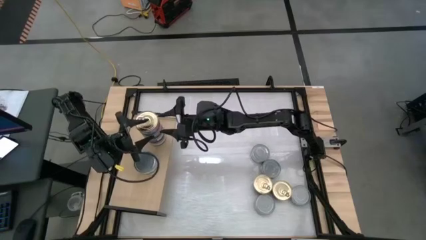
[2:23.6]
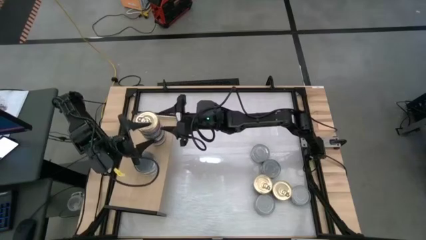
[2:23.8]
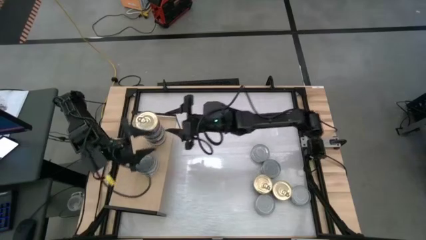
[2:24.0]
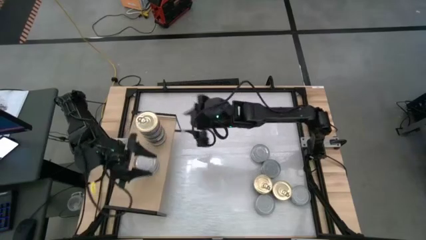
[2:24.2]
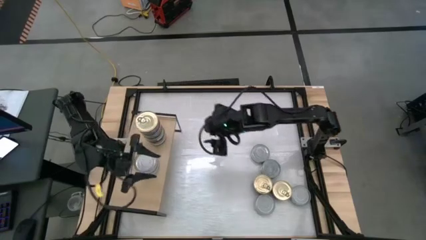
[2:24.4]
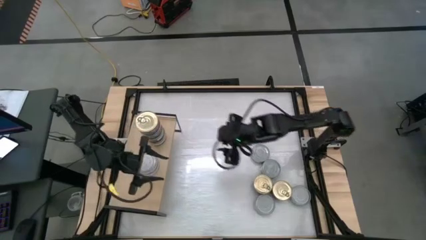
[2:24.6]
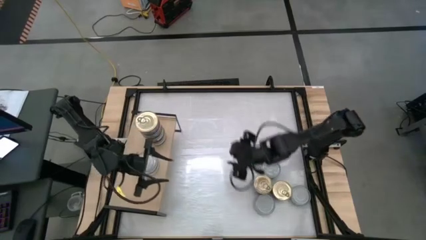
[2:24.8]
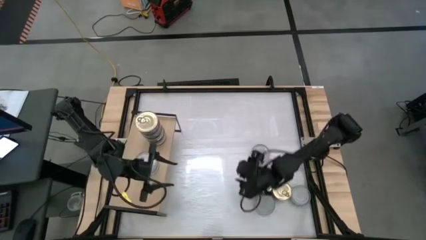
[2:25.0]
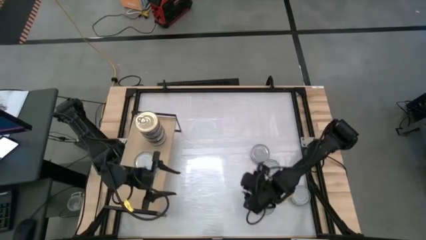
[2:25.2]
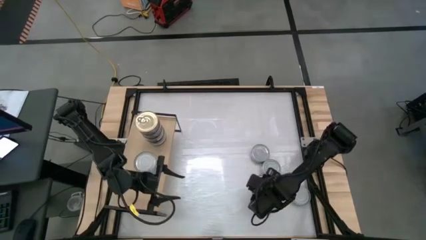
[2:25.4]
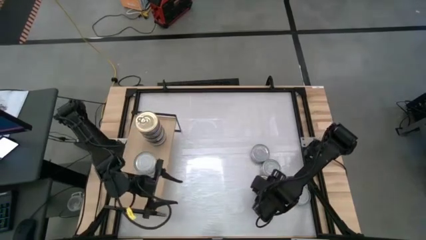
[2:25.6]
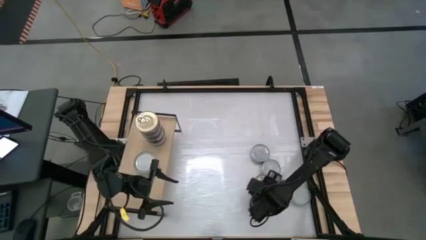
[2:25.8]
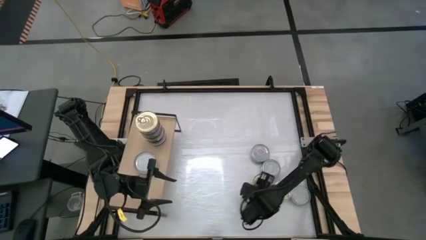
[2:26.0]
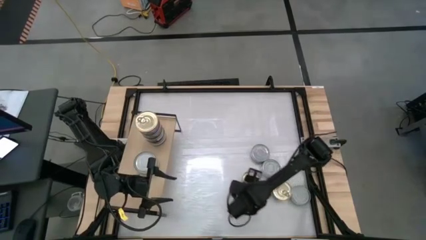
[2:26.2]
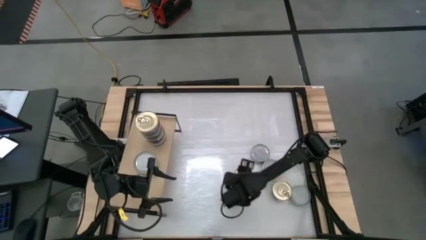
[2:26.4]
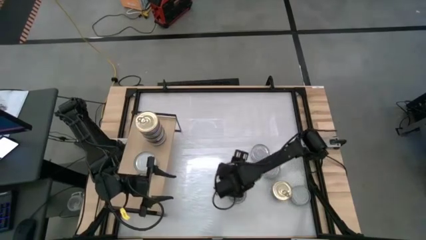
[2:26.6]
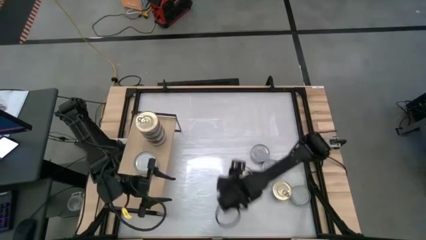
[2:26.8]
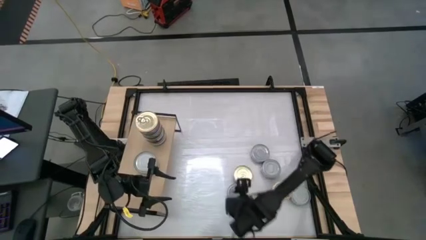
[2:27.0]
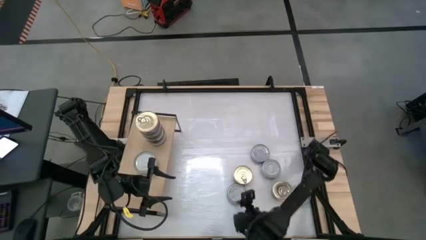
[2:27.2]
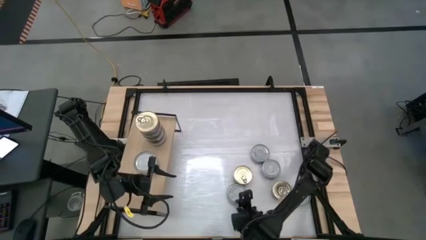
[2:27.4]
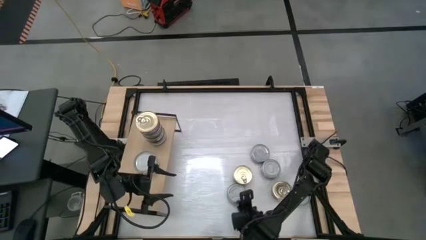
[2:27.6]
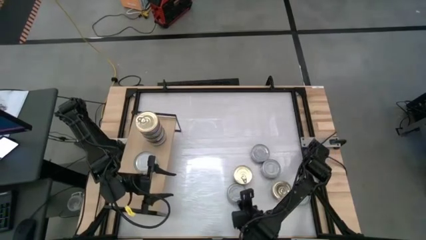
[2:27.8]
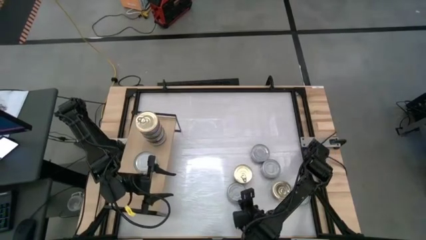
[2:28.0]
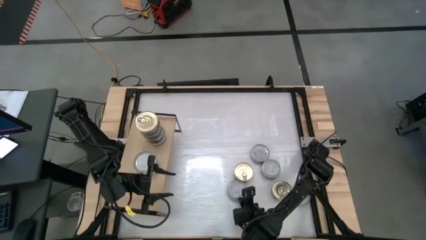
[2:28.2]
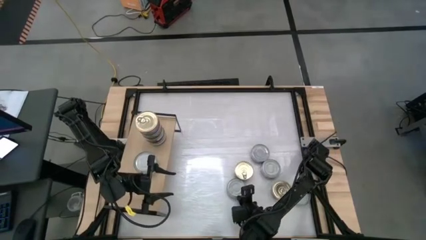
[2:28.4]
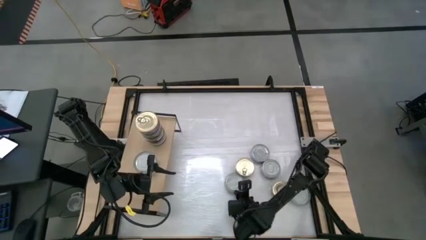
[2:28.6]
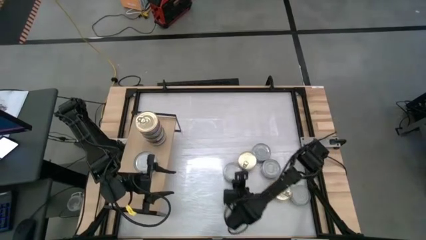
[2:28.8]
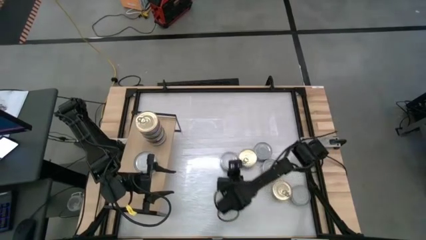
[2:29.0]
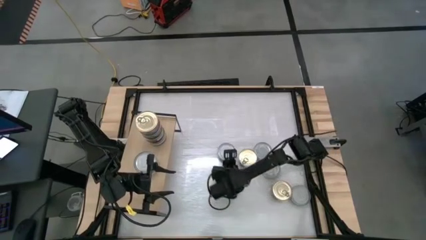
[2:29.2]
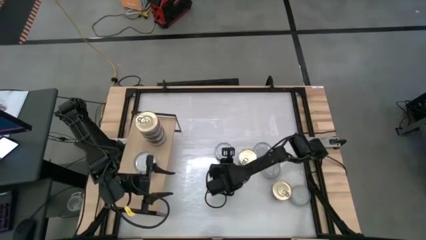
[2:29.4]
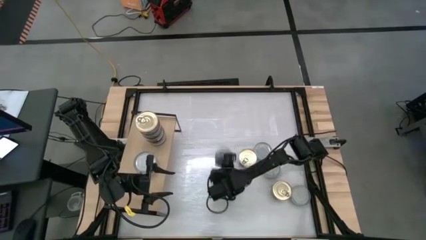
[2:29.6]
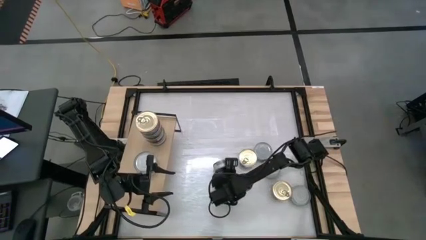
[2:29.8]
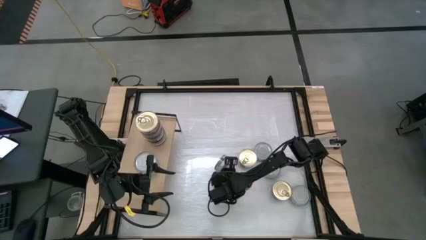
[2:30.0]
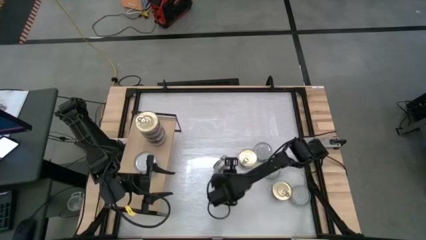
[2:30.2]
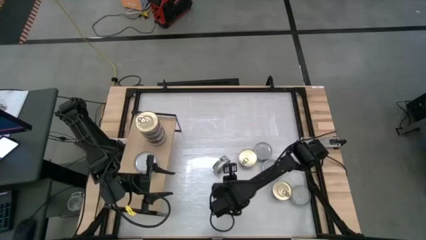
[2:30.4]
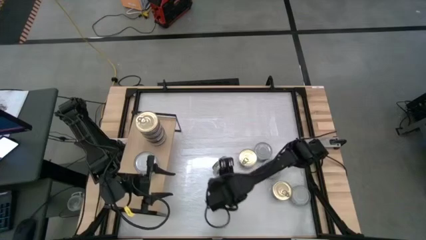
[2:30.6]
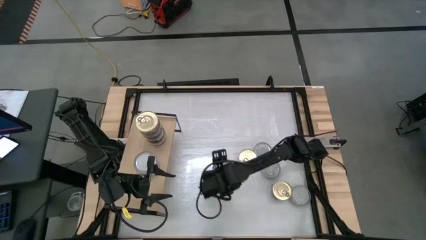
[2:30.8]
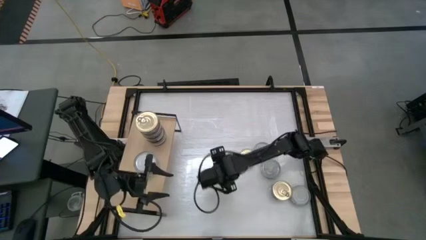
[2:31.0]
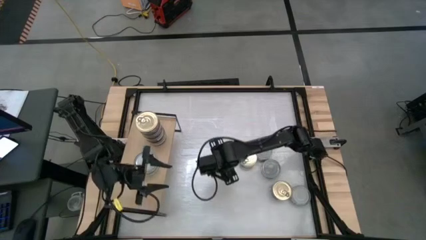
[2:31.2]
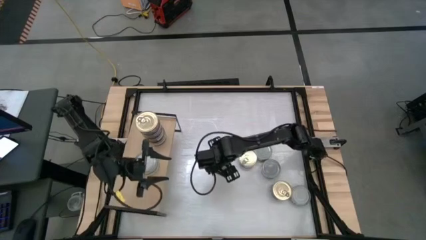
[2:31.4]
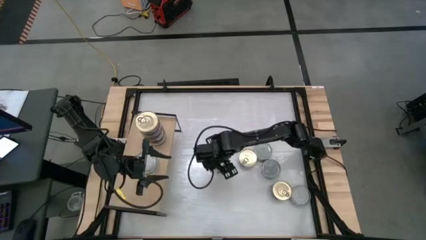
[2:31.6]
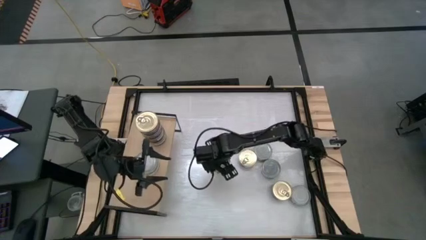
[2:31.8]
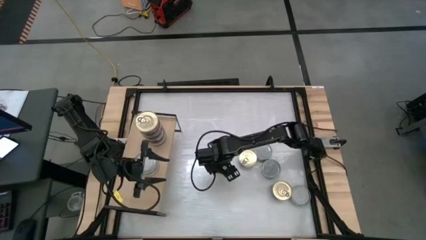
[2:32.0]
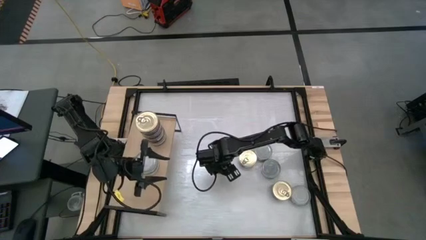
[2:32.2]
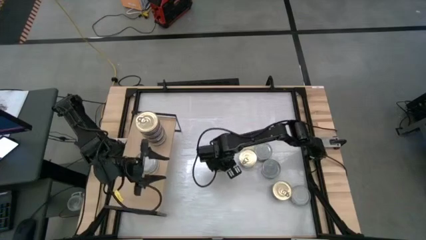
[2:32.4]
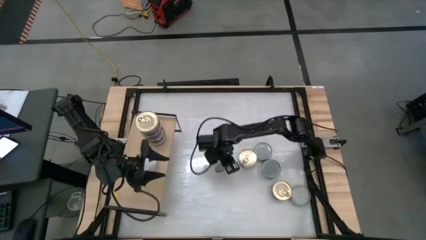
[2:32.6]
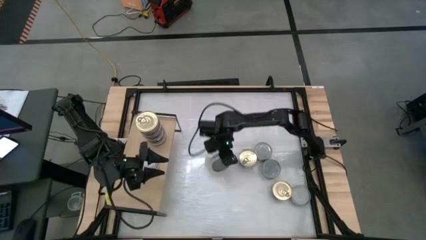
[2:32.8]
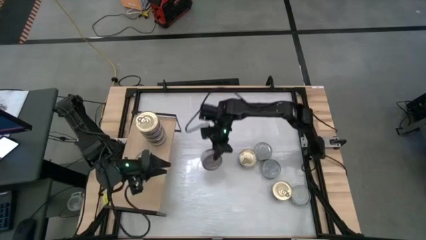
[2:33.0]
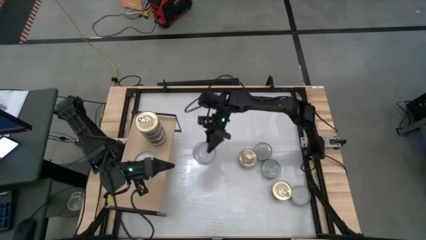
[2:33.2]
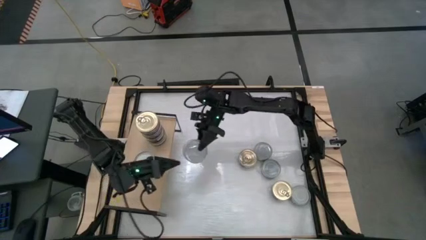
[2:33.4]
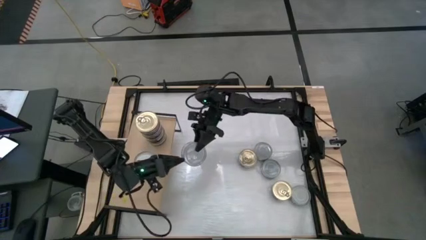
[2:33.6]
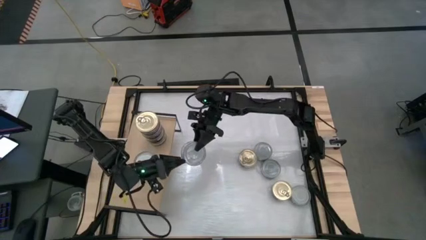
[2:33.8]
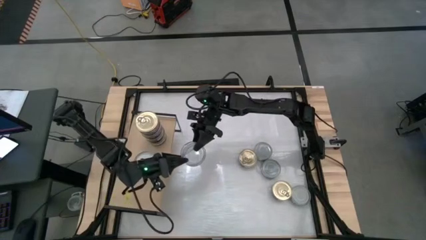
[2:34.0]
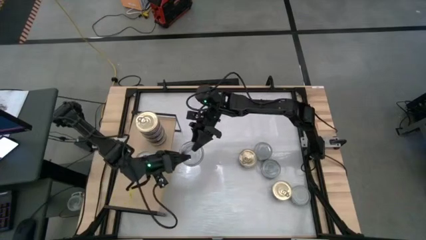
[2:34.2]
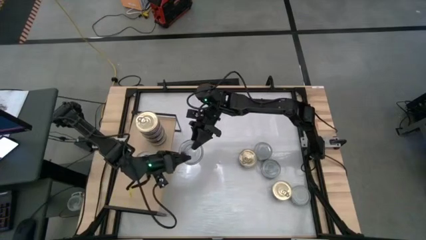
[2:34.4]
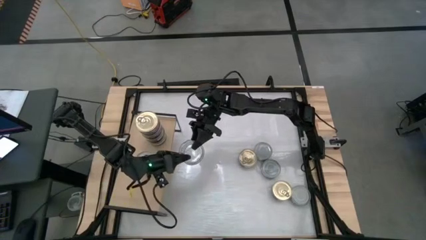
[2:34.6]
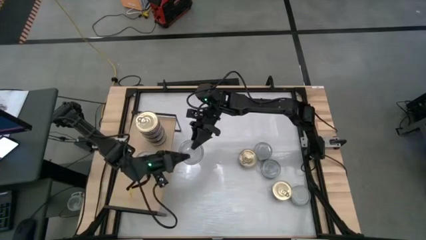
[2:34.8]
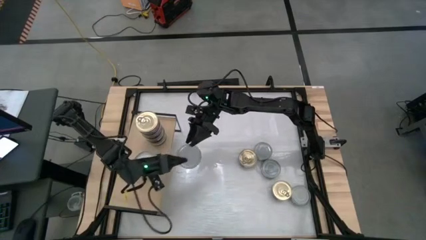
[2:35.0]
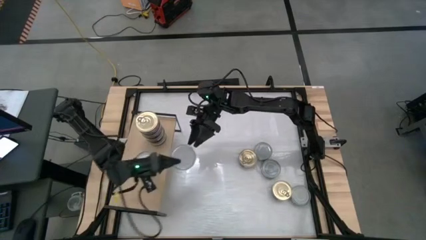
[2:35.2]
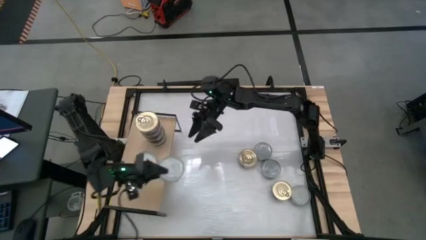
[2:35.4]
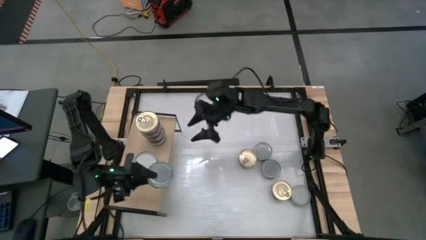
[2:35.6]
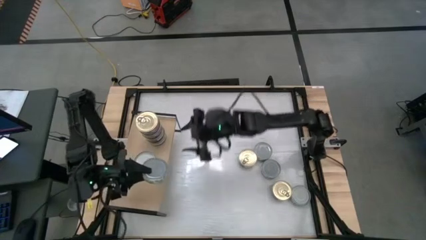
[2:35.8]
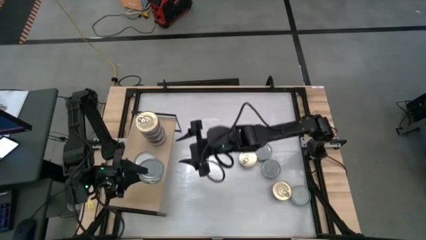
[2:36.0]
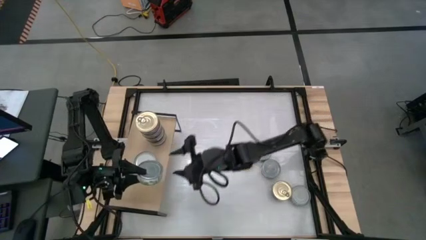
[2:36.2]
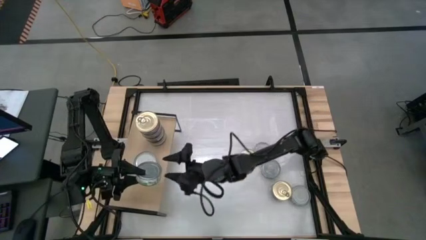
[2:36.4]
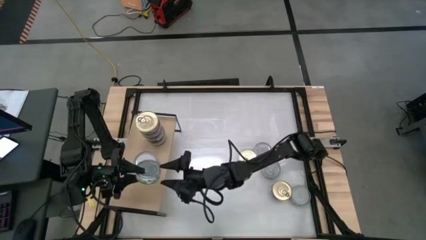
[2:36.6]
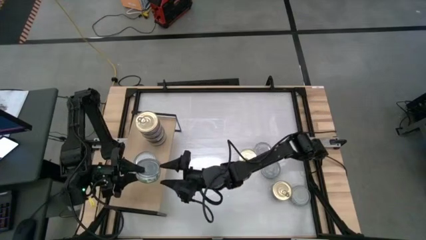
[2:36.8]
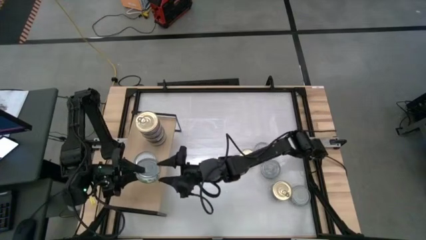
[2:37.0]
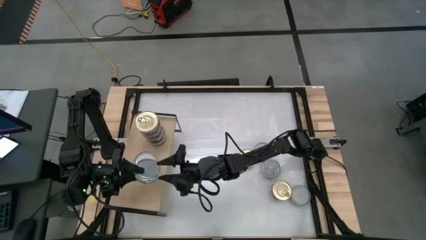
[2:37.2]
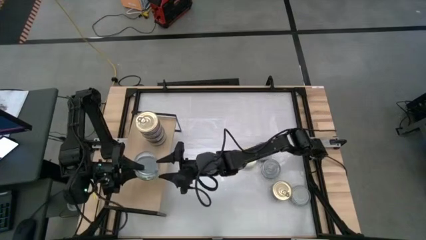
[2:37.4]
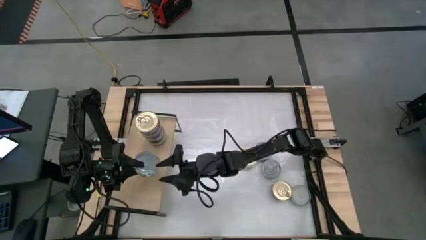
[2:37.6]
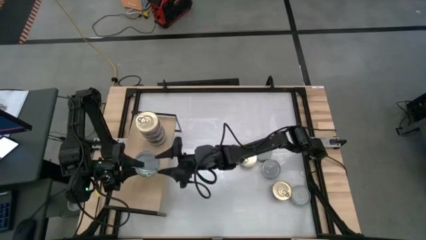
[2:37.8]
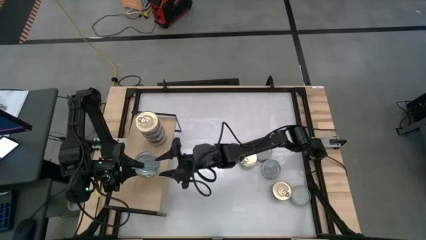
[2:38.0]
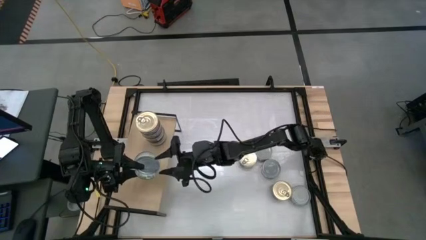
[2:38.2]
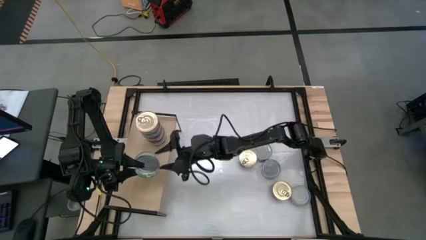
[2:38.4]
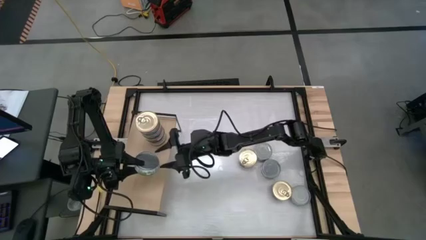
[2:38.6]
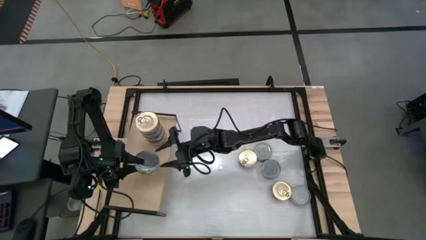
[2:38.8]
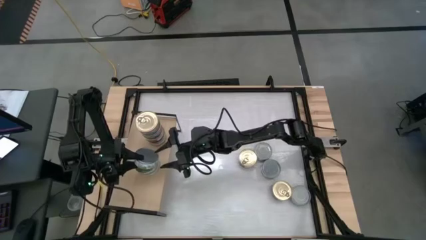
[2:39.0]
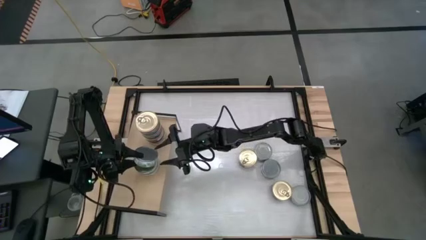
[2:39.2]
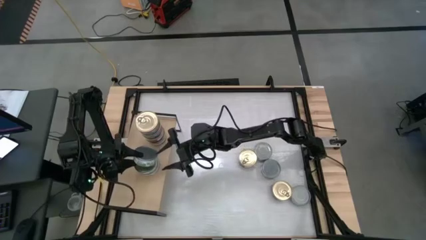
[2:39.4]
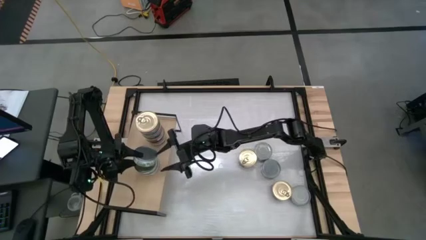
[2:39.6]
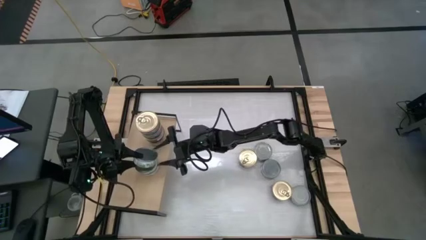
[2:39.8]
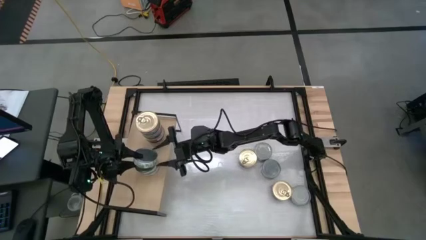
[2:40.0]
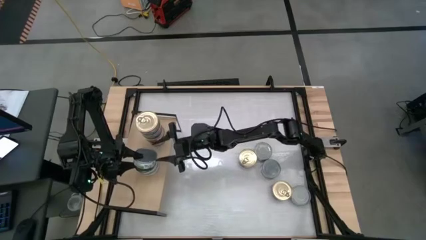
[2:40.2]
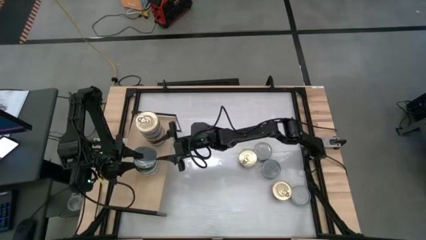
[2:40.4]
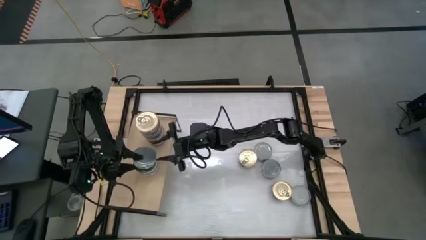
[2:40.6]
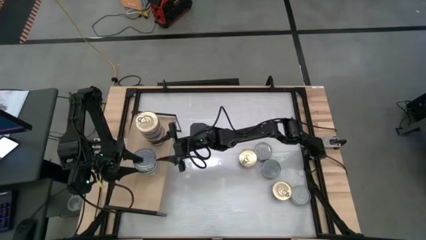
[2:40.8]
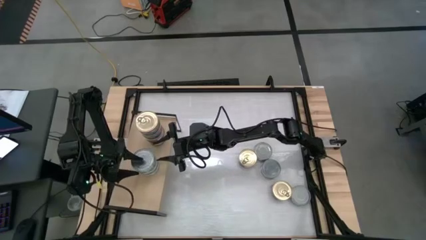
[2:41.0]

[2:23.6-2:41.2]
Task: Stack canned seafood by type on shelf
Stack the blue tuna can on top of the blue tuna can on the shelf
